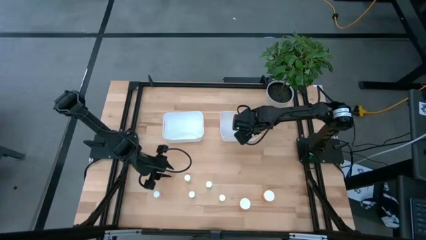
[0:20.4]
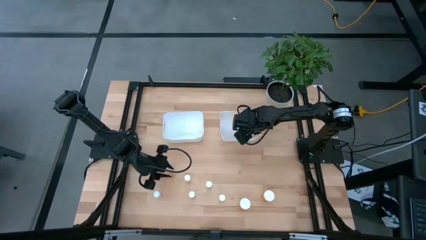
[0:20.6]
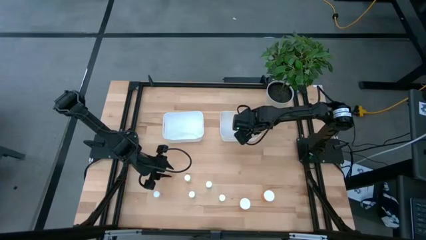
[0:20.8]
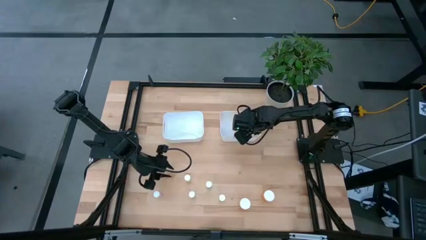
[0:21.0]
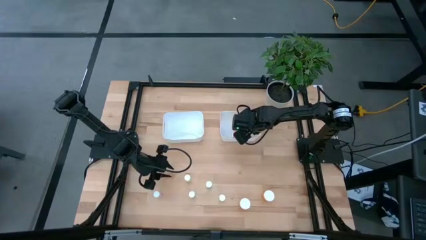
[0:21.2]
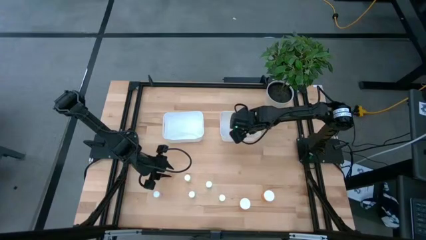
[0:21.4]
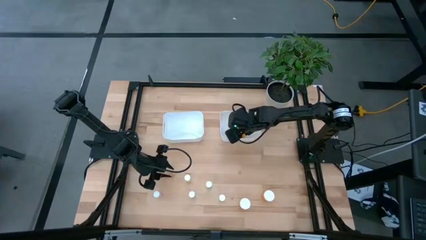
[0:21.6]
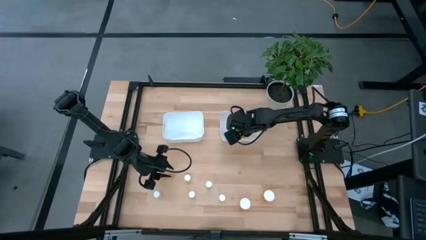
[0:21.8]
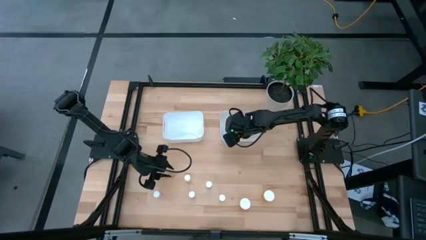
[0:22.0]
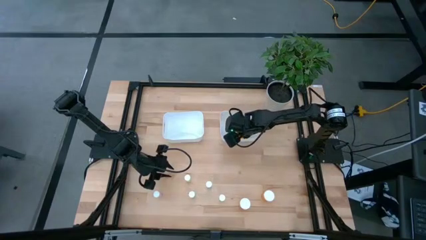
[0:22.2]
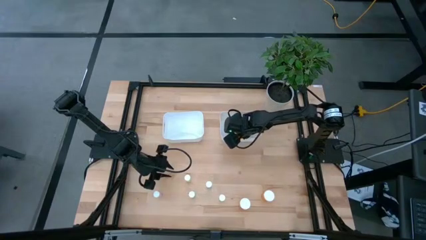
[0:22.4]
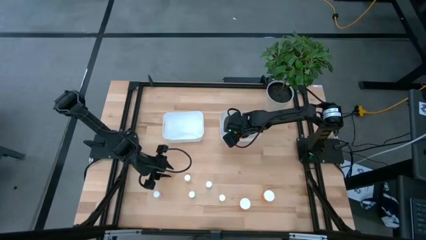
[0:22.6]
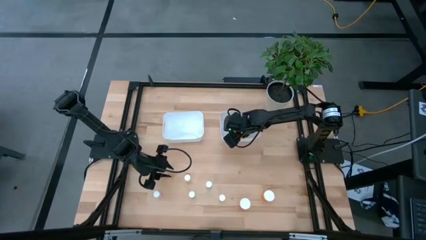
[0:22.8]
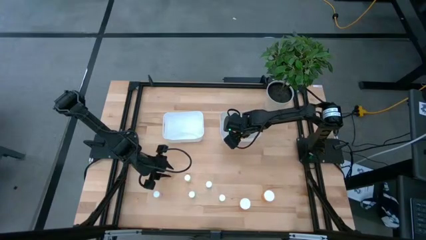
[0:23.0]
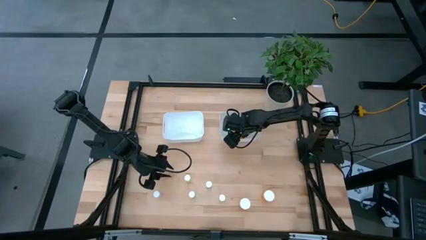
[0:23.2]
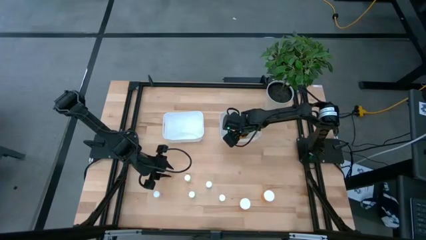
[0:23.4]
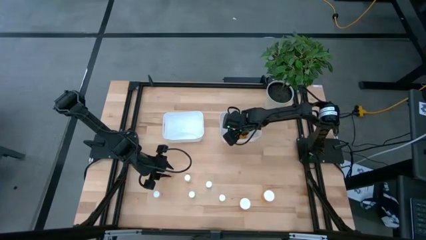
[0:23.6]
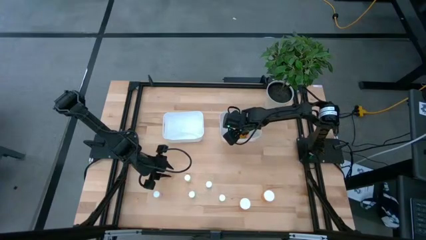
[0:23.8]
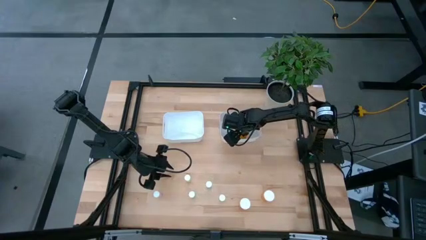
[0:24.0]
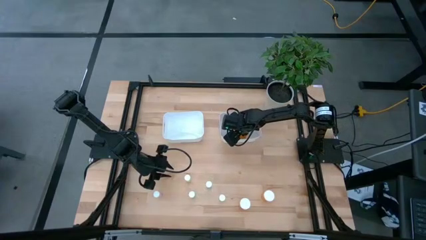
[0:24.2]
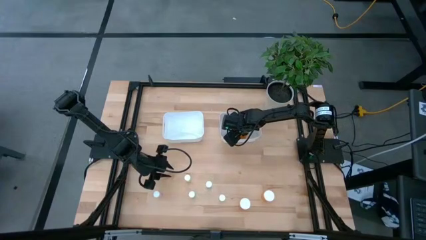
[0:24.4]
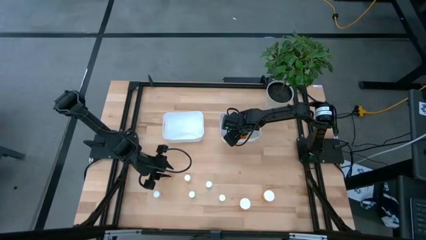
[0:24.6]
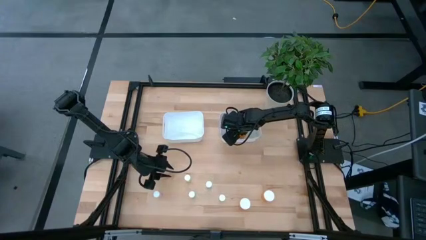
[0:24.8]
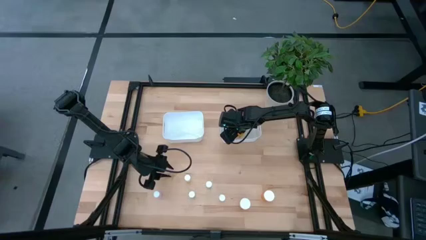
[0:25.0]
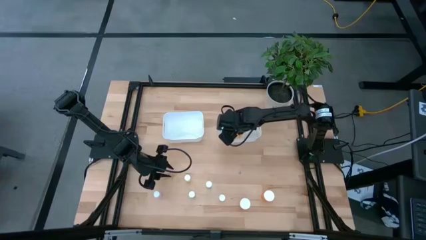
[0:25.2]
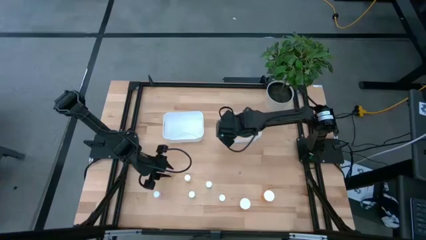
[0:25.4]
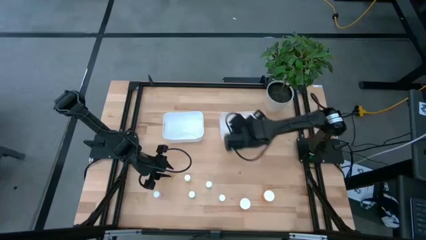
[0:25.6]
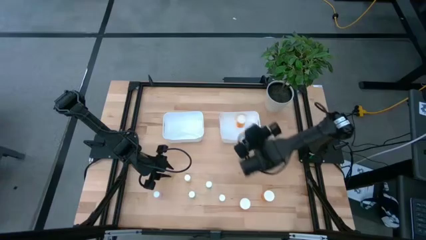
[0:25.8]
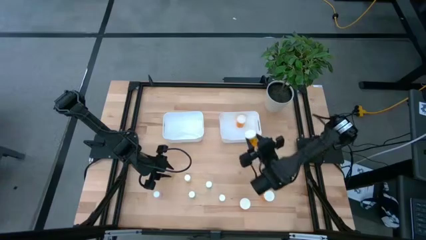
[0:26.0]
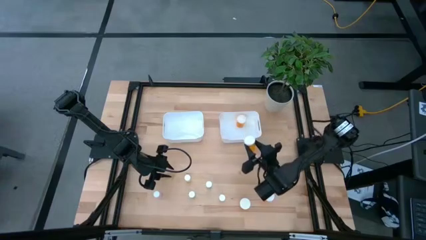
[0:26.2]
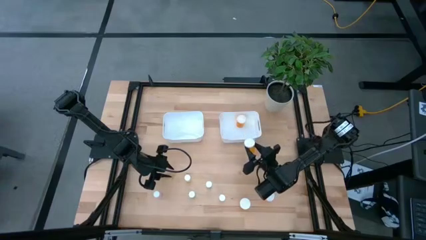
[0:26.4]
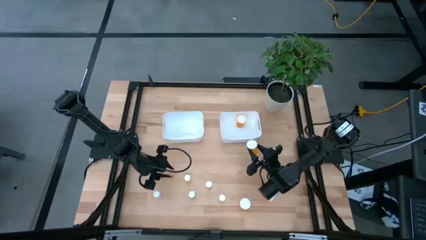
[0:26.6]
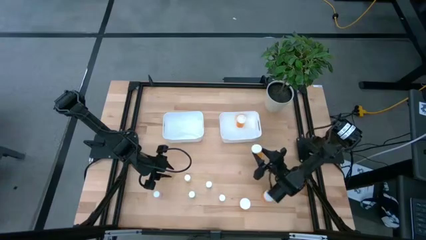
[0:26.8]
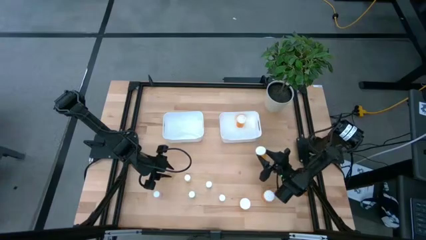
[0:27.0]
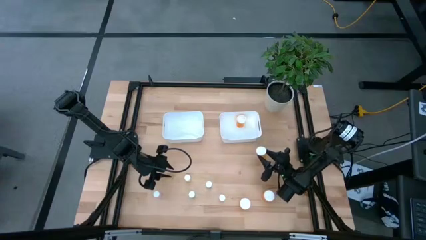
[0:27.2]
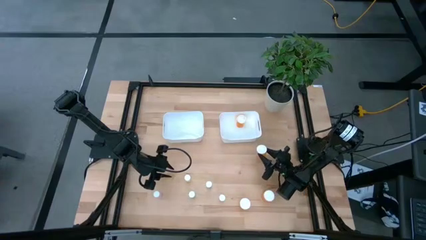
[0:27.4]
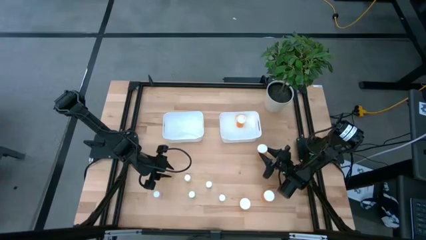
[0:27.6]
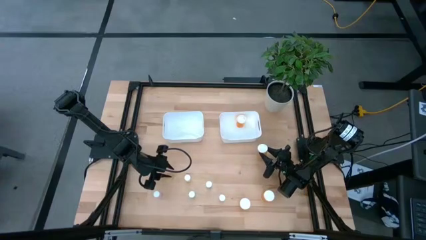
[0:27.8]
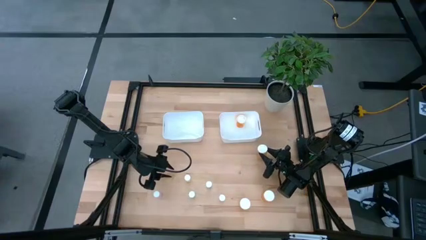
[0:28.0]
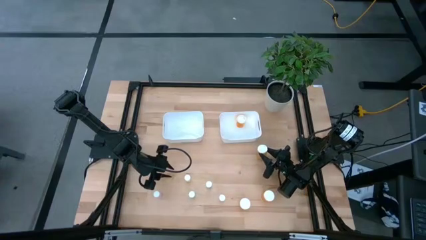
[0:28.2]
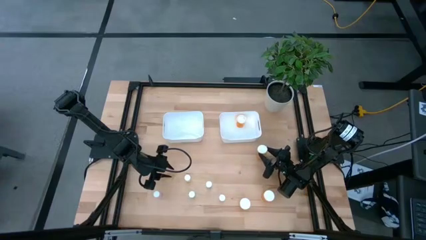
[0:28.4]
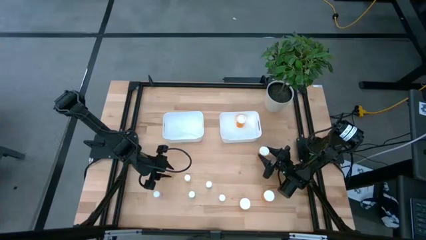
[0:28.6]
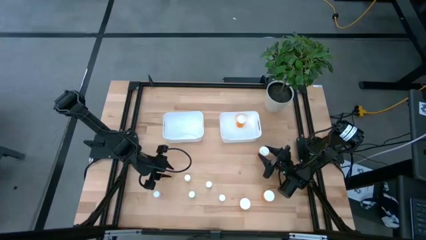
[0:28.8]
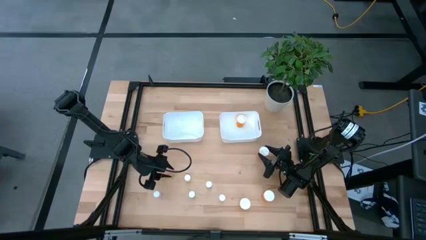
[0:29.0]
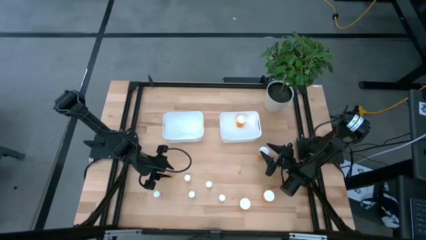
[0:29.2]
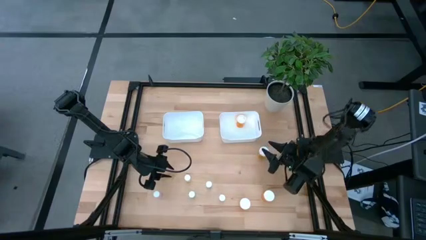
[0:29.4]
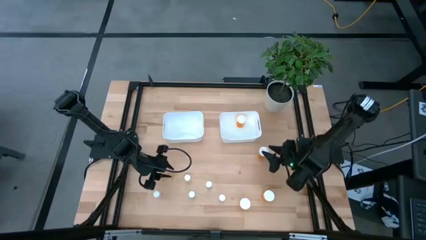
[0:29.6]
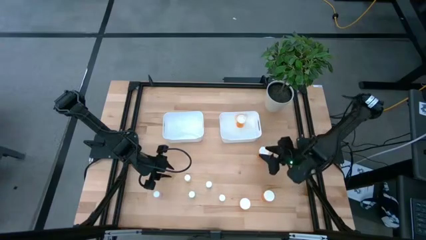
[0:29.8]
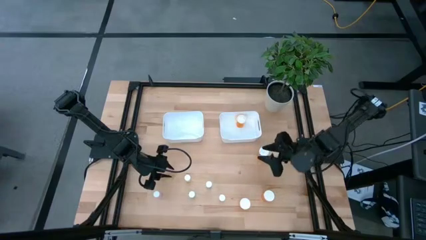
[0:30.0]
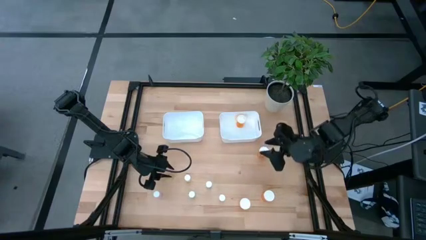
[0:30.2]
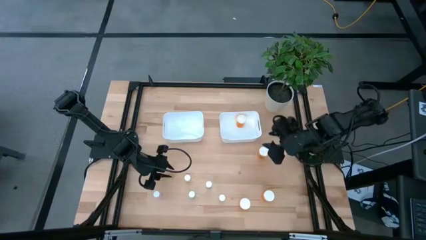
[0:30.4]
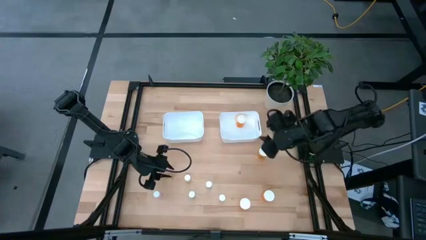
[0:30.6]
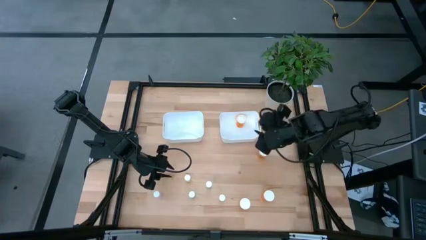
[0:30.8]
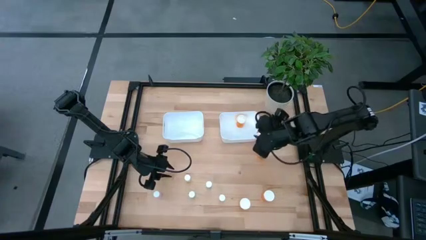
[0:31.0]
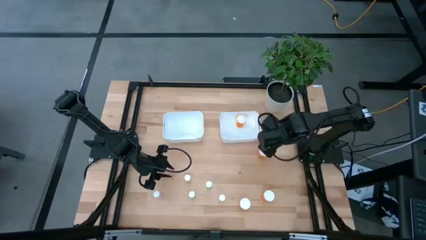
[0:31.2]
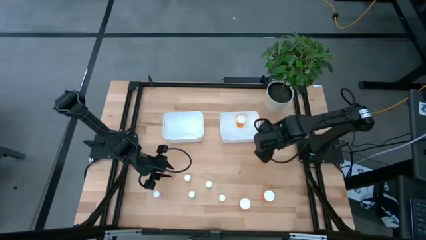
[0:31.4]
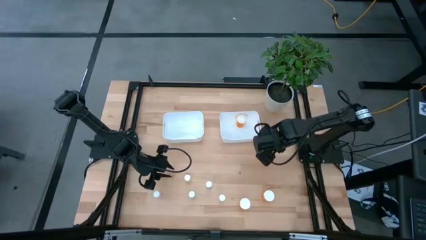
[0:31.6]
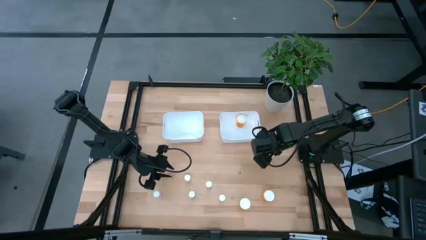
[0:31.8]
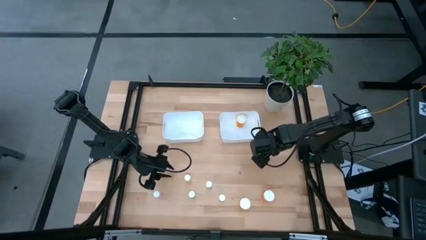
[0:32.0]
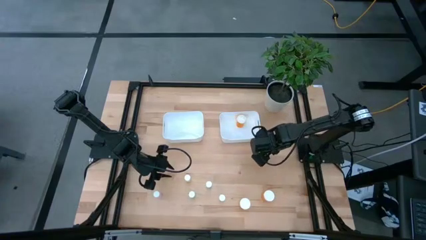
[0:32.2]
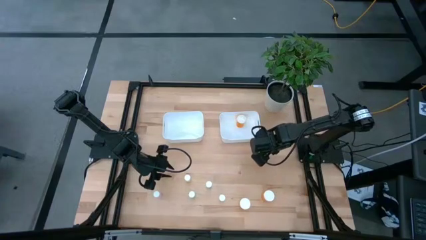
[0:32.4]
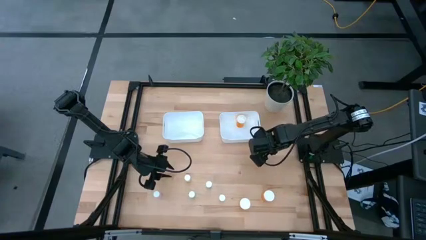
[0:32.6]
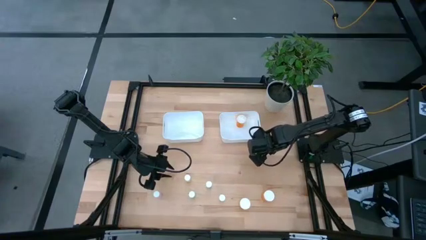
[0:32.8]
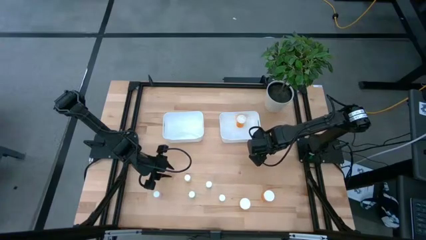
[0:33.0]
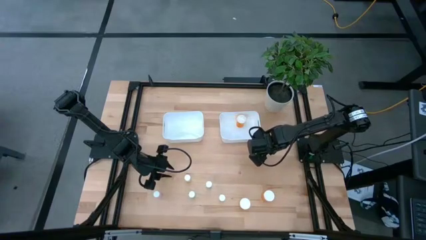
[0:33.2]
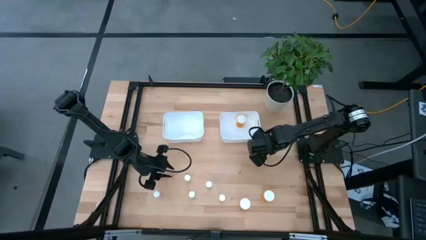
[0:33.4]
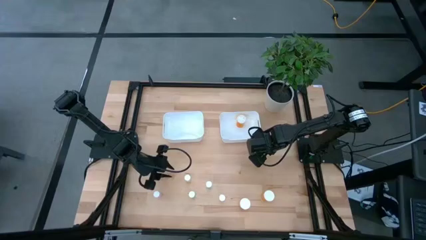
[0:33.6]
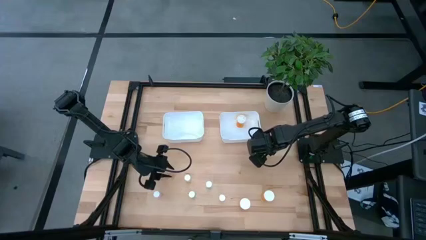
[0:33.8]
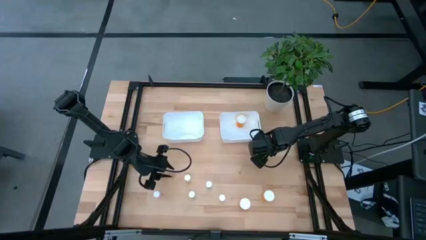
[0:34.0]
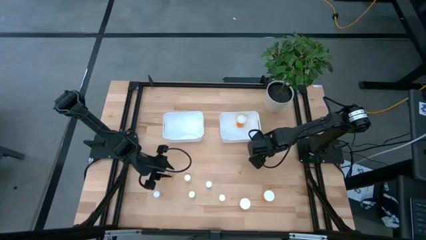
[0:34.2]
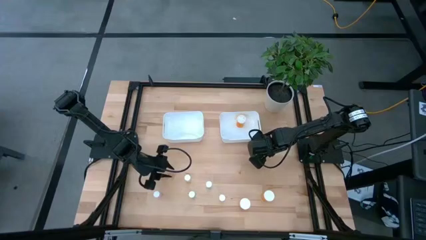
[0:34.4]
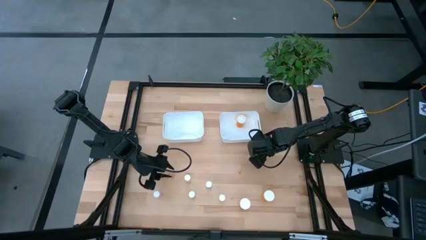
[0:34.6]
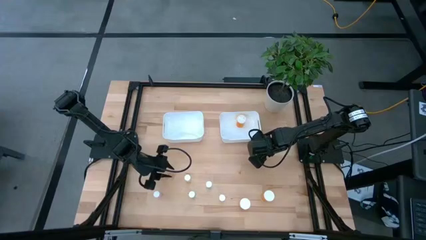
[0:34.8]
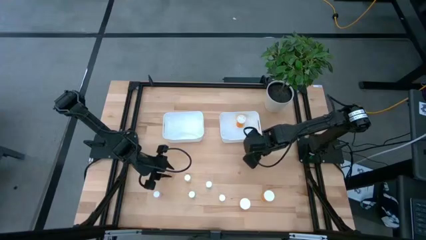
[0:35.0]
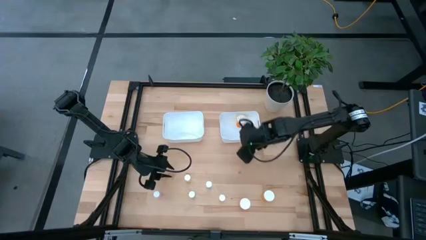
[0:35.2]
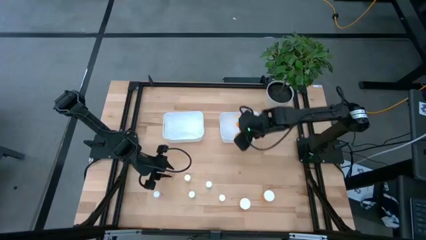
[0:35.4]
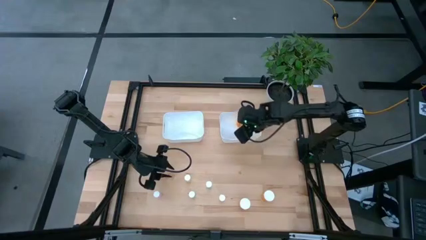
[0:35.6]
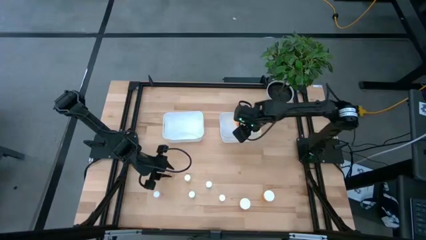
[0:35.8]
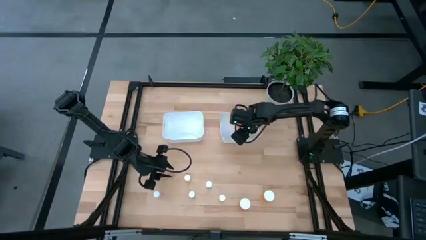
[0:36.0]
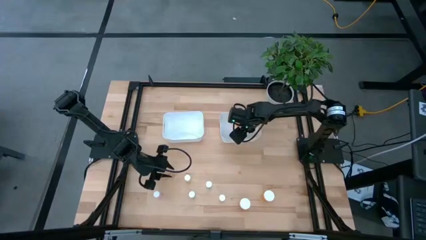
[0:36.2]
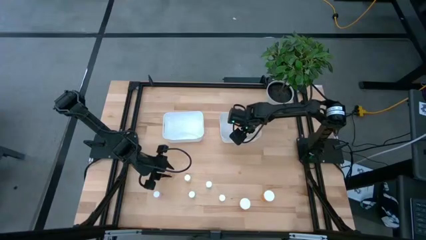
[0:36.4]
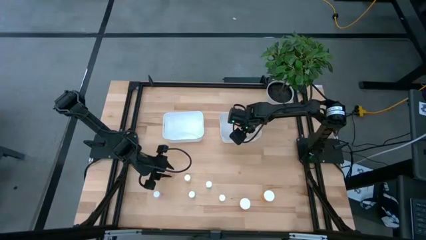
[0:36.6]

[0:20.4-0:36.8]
Task: Pick and place medicine bottles into bin by pill shape (circle, oval)
Put the right orange pill bottle into the right white bin
